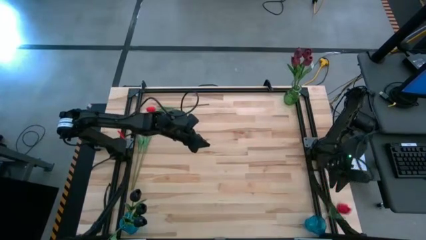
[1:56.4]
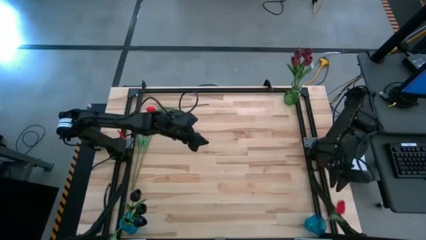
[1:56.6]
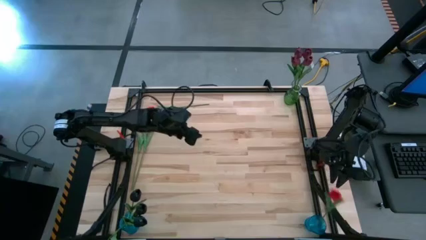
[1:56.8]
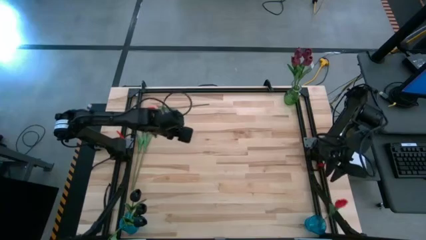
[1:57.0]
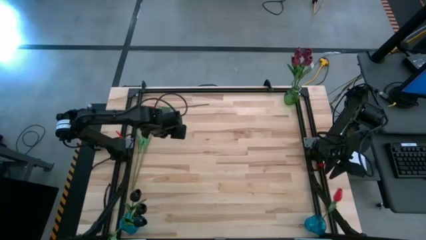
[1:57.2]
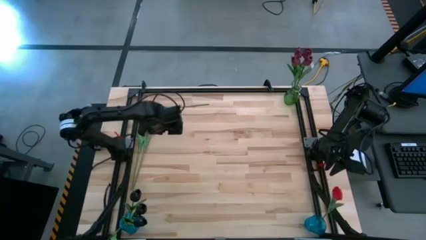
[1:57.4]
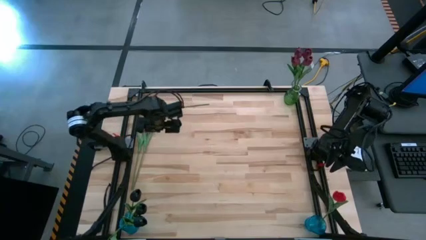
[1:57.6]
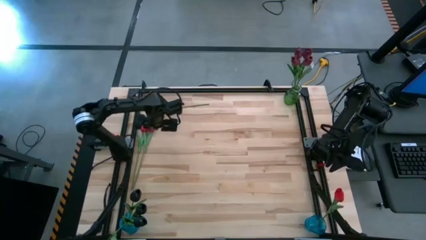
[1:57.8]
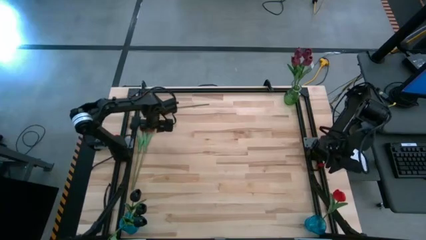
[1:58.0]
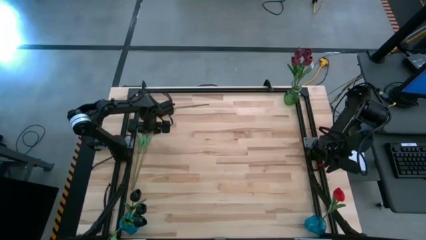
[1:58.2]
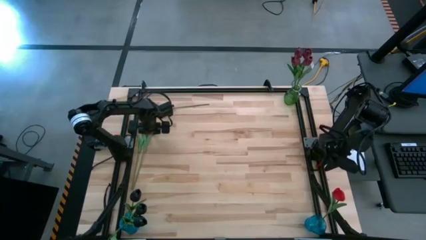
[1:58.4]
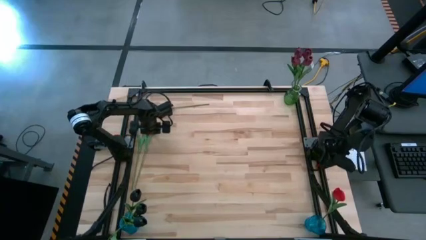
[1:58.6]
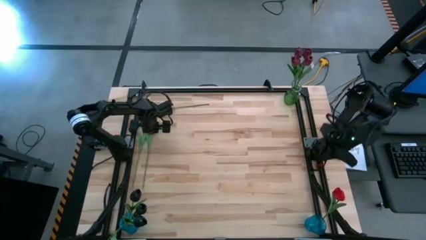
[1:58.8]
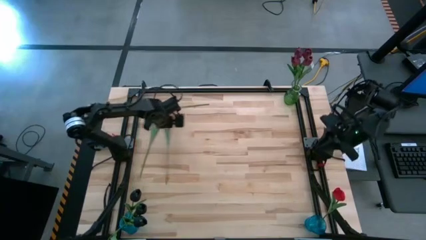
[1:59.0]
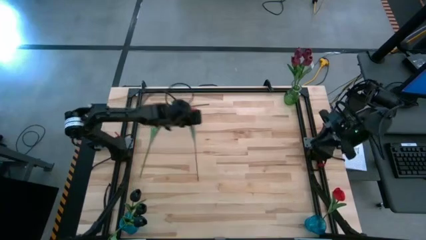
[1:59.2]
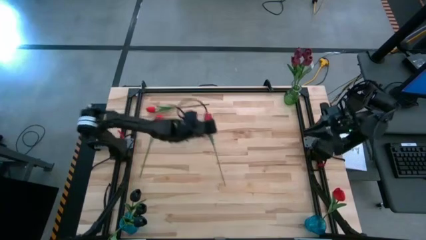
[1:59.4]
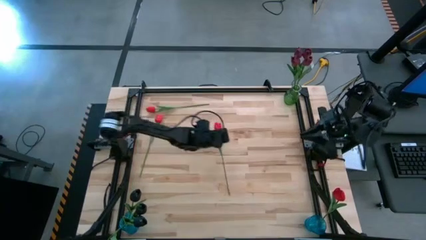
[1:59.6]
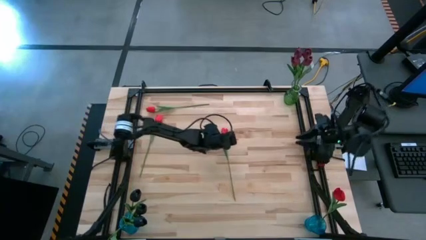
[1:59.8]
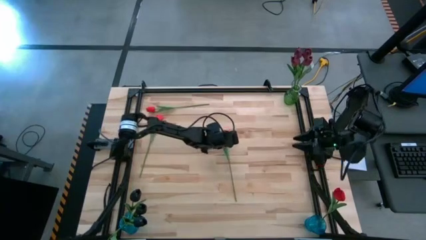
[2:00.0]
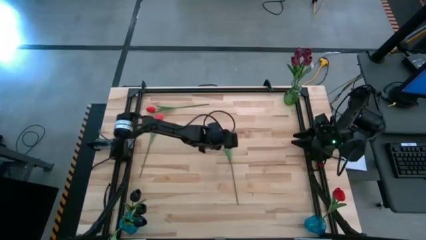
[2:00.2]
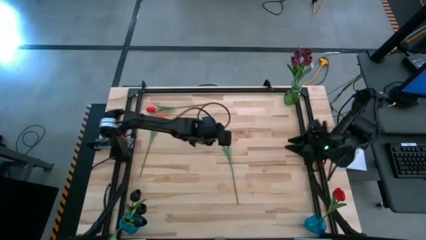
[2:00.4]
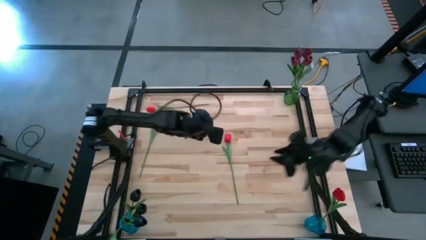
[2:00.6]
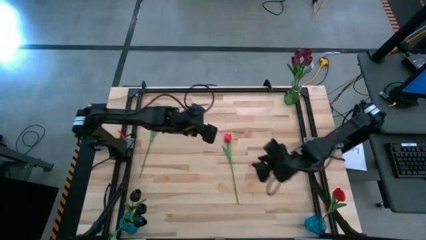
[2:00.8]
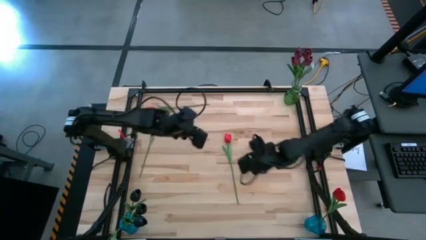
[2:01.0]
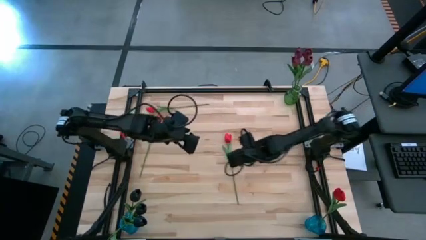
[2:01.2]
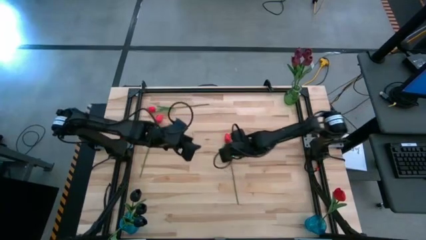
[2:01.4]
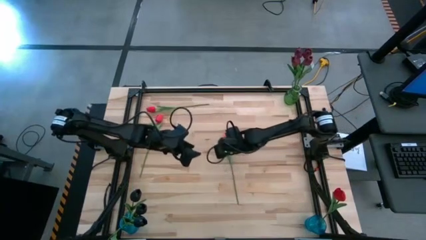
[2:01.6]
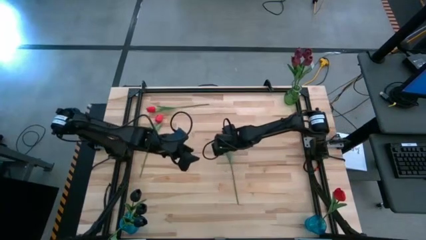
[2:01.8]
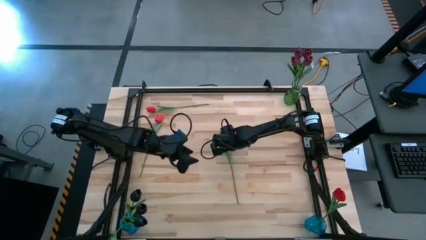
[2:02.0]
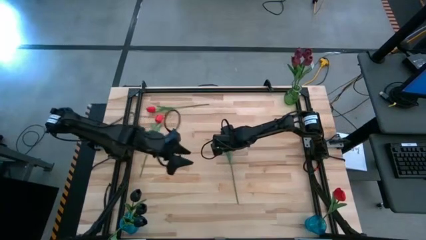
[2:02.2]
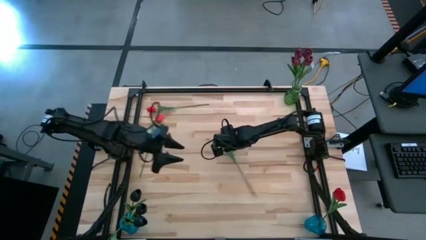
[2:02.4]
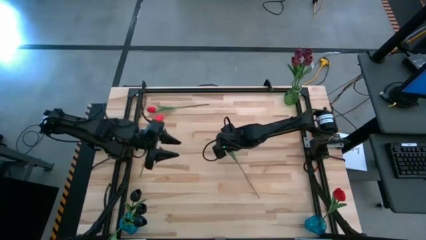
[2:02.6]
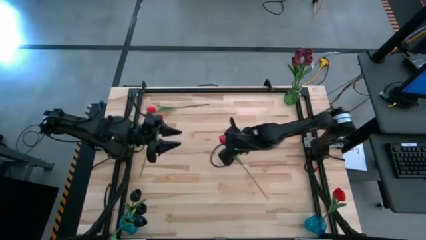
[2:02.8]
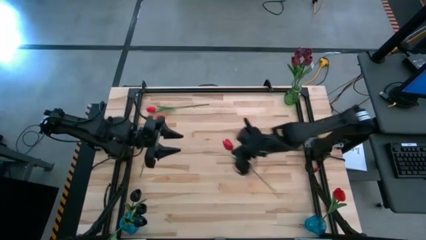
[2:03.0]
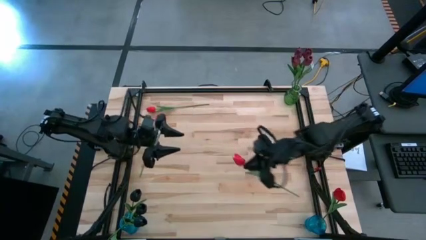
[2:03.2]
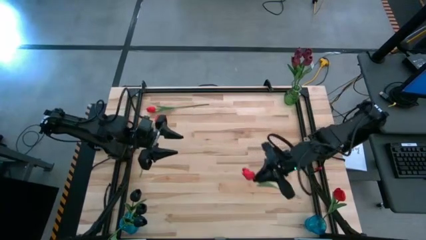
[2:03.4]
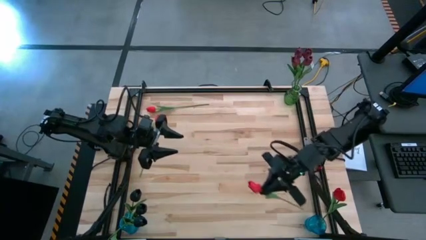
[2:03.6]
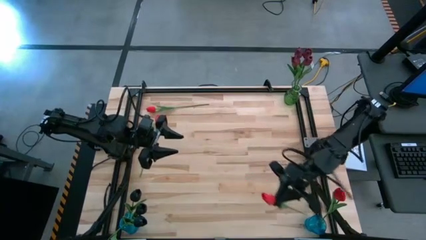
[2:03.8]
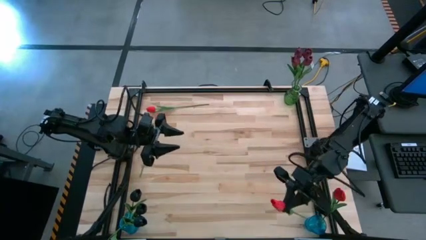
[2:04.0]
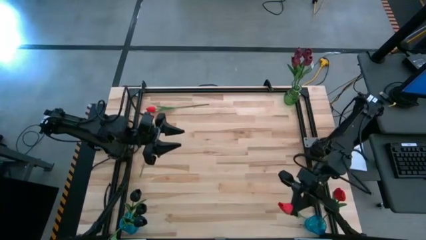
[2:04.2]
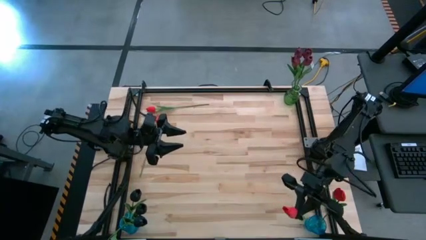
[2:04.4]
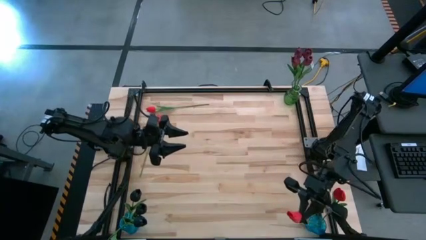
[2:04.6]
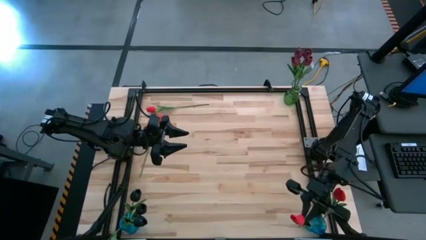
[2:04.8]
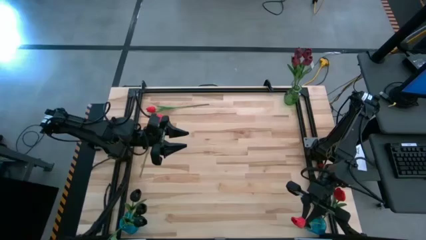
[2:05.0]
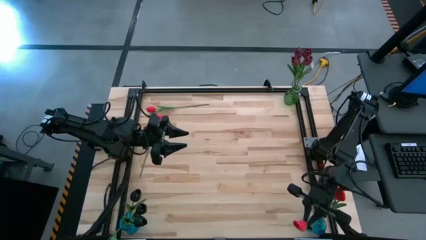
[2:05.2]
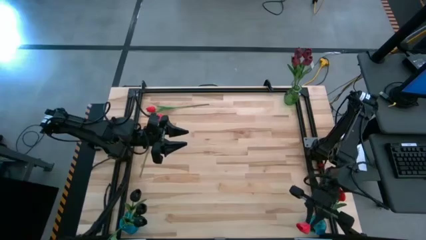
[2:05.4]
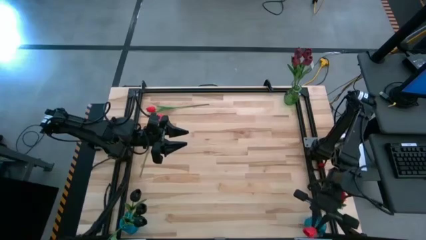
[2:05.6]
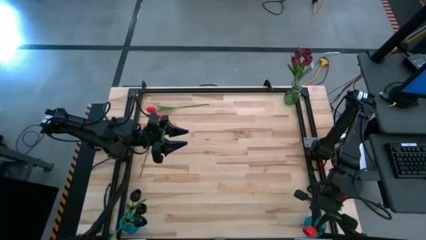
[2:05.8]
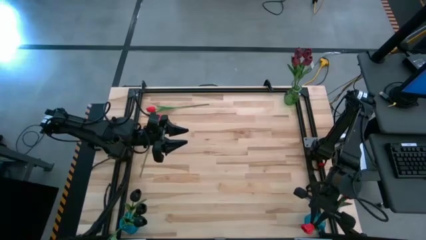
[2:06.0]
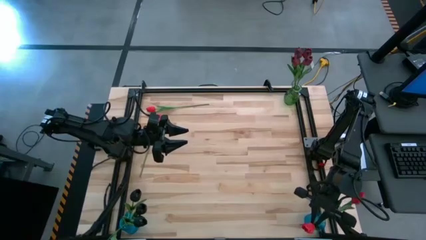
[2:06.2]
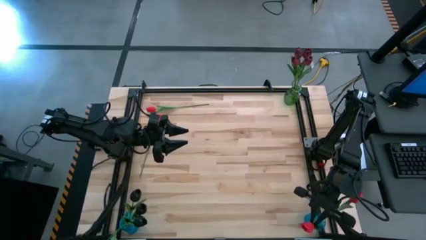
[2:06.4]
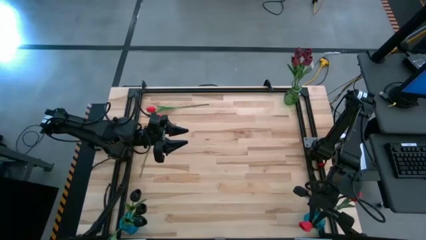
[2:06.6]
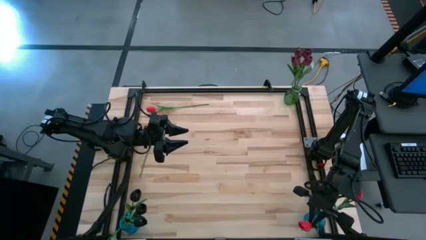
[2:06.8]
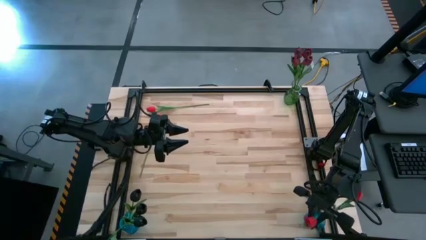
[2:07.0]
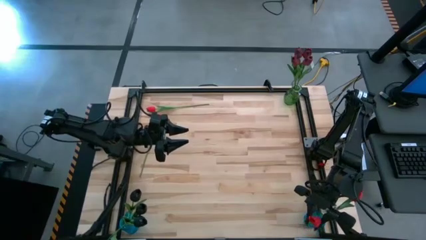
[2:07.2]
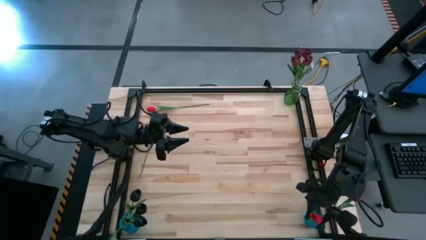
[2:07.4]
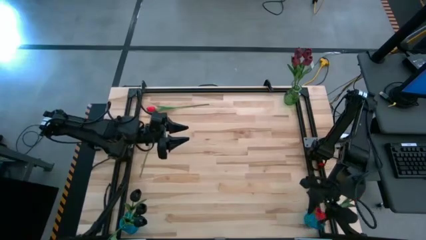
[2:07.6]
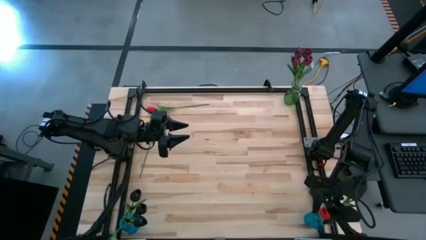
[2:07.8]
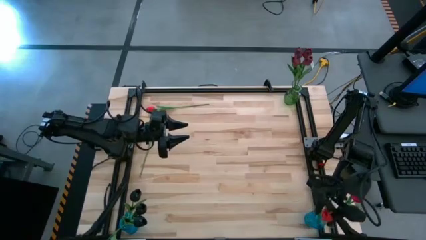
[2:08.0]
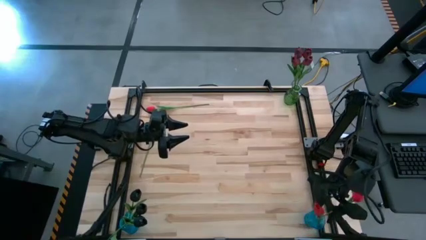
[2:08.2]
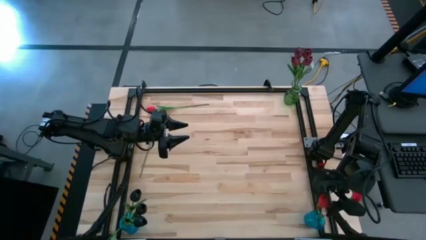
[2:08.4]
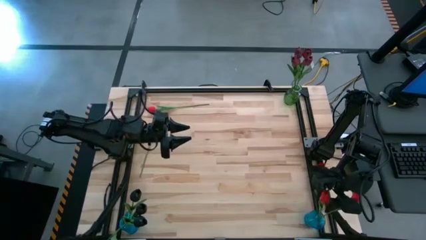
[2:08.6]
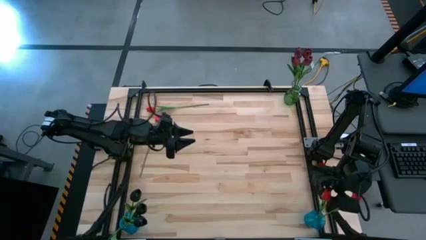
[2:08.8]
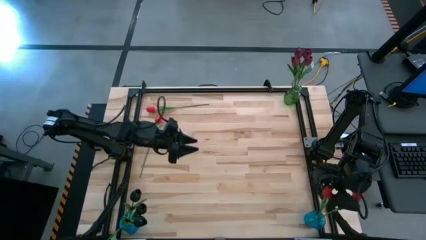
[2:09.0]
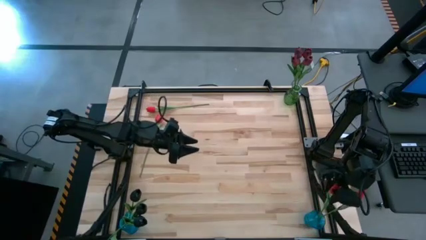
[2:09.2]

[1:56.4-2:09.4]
Task: Sort flowers into vase by color
Put the red tulip into the right blue vase

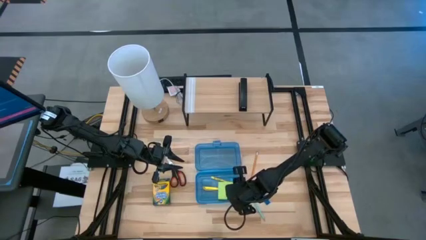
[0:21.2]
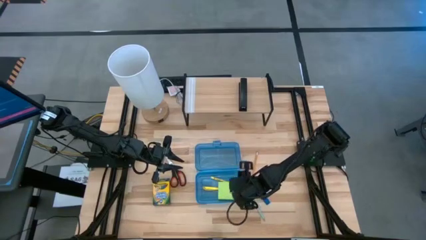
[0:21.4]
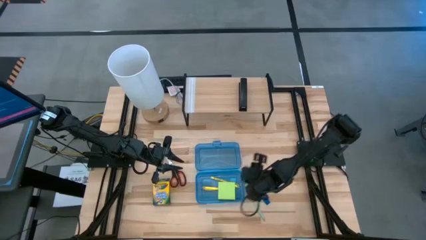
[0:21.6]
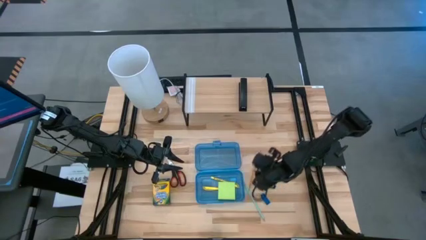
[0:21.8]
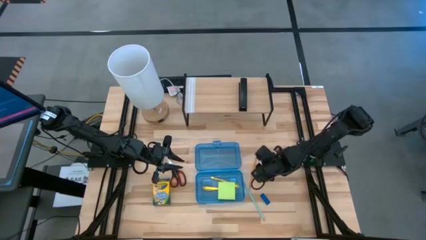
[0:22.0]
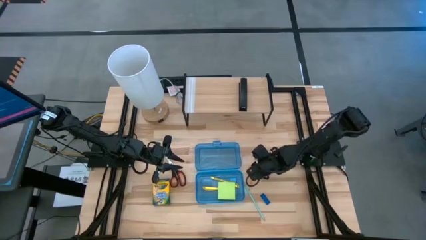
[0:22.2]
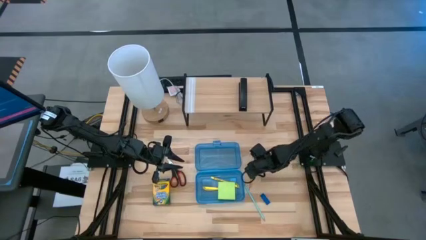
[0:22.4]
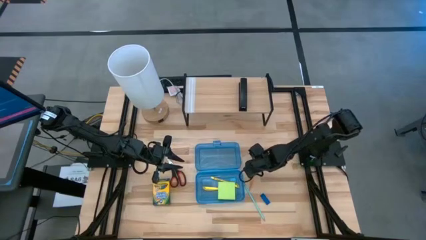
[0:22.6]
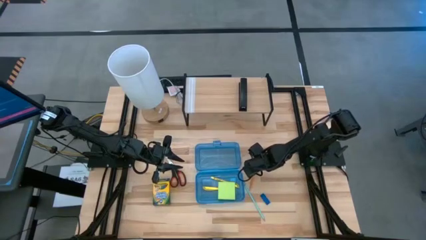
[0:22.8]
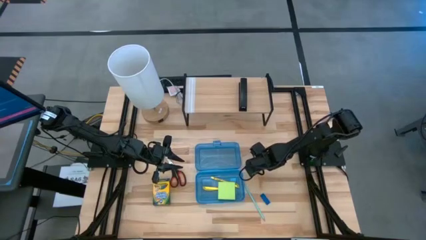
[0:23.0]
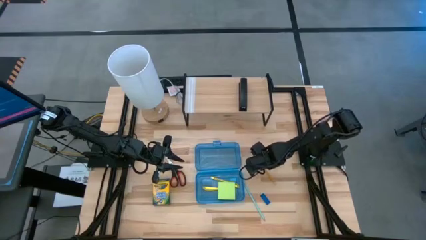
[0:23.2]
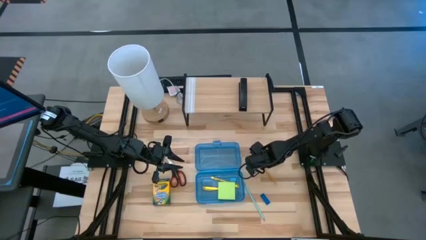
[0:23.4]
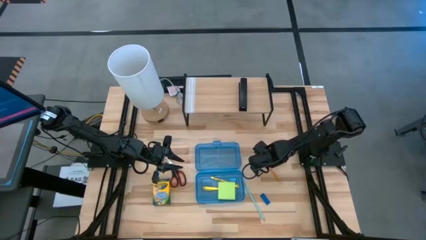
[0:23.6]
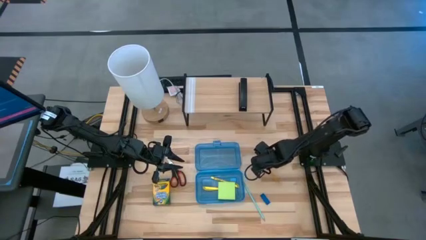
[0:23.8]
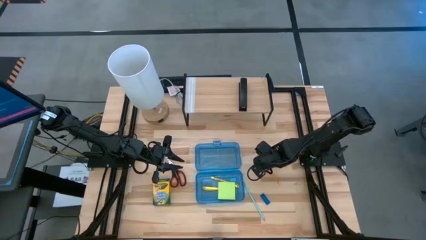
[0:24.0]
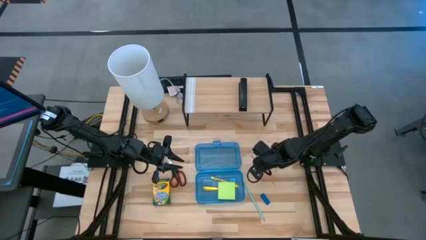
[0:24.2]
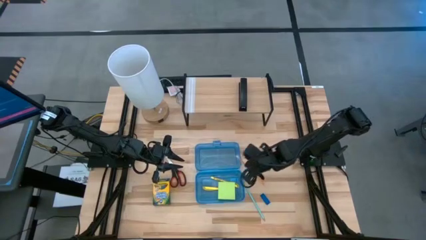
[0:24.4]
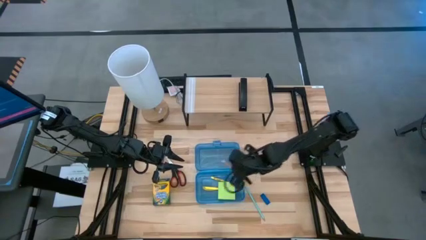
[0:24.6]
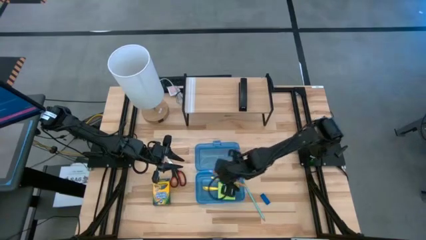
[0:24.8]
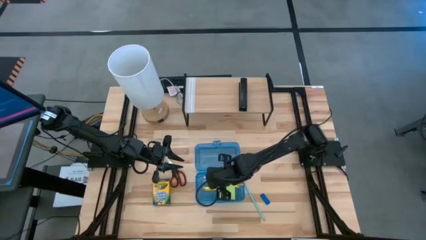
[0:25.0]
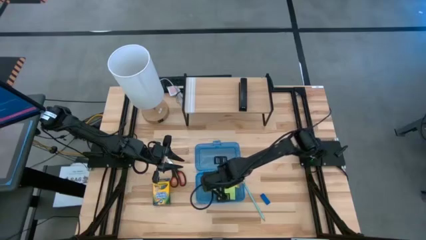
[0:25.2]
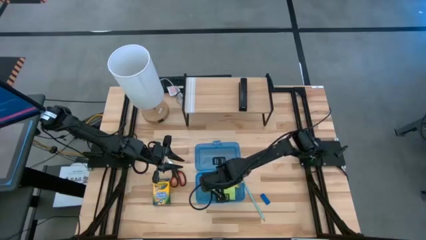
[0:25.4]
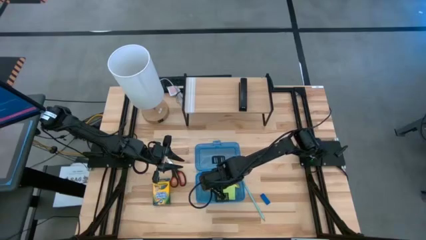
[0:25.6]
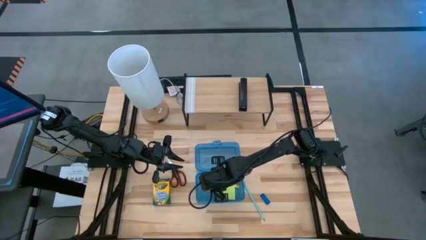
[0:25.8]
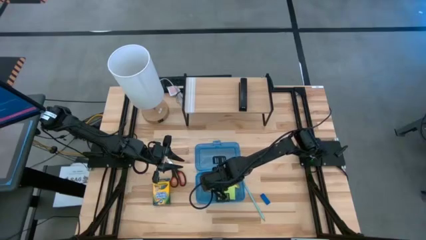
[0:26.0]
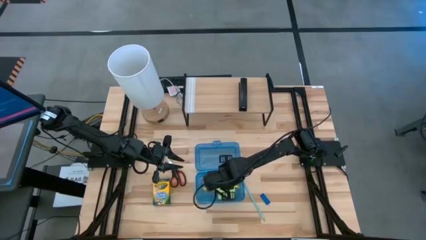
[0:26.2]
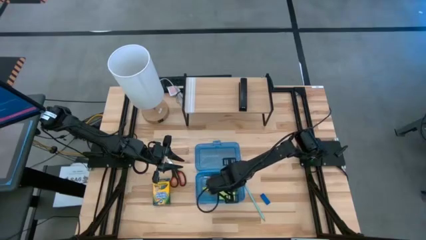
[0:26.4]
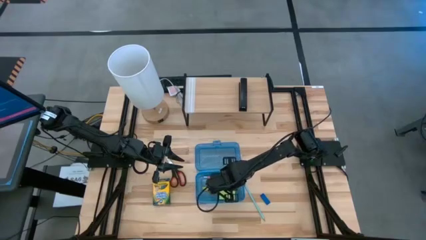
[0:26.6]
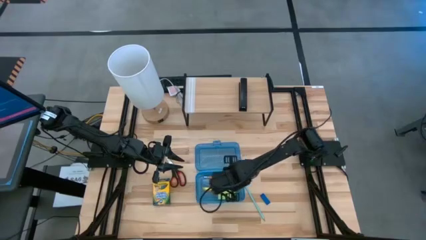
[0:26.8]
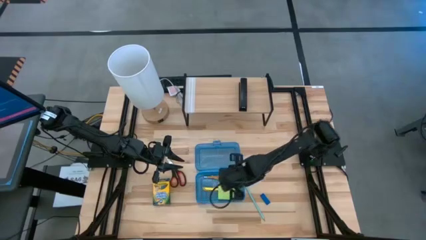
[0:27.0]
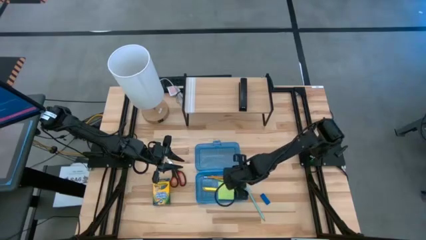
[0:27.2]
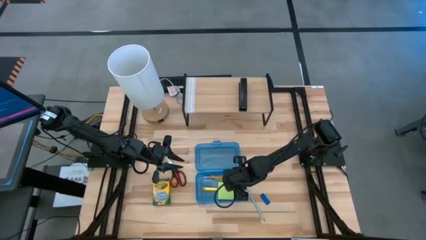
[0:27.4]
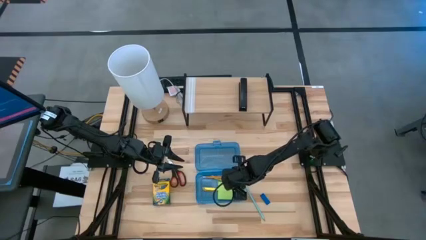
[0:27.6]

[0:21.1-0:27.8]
Task: Pack school essentials
Put the orange pencil into the blue supply box
